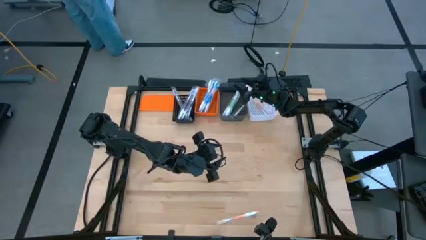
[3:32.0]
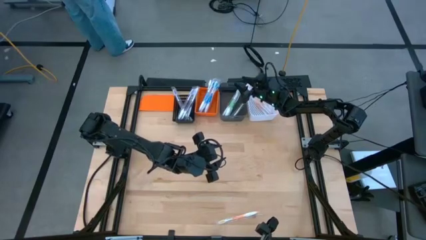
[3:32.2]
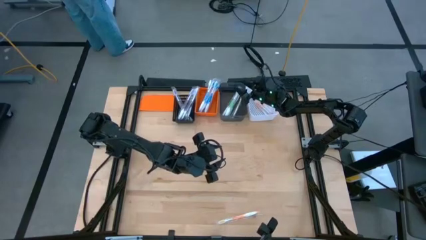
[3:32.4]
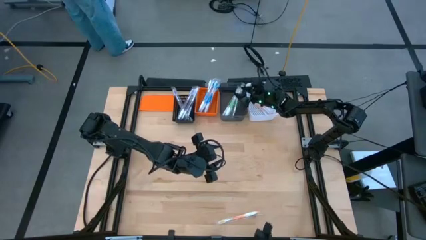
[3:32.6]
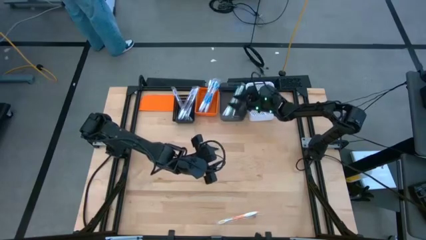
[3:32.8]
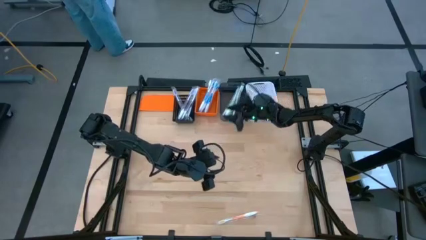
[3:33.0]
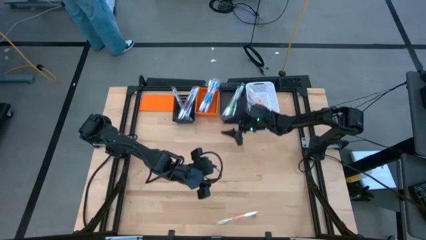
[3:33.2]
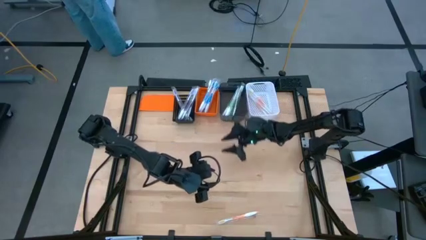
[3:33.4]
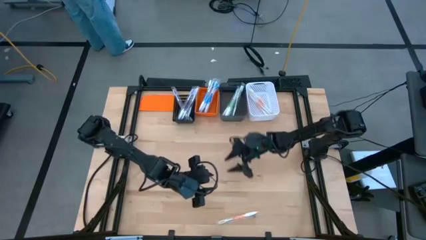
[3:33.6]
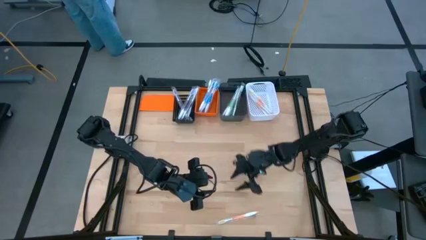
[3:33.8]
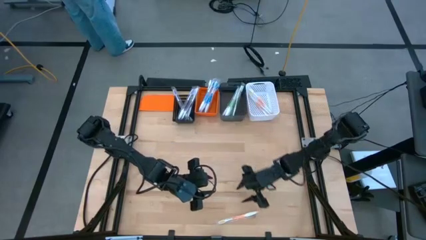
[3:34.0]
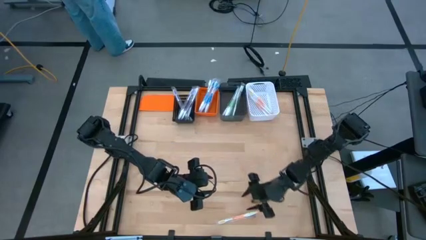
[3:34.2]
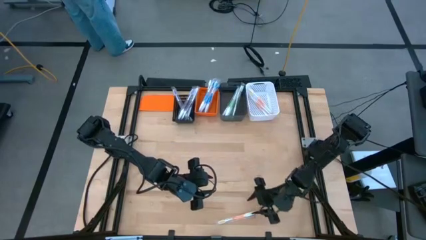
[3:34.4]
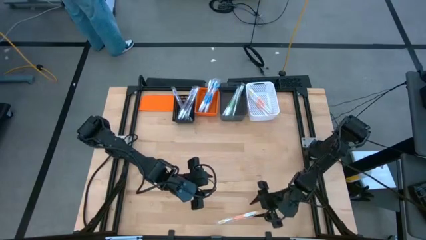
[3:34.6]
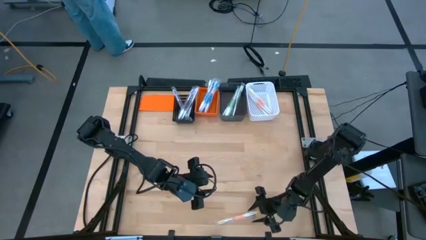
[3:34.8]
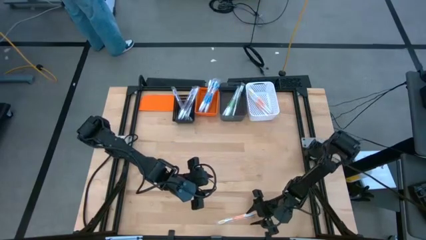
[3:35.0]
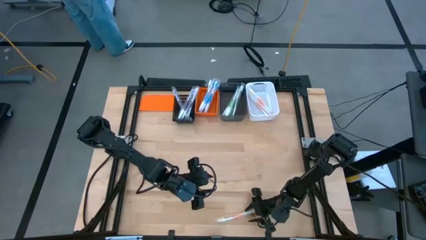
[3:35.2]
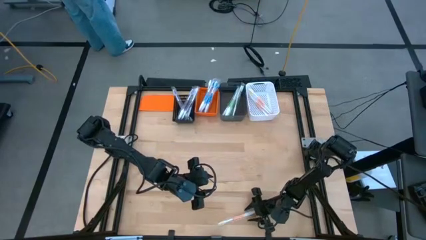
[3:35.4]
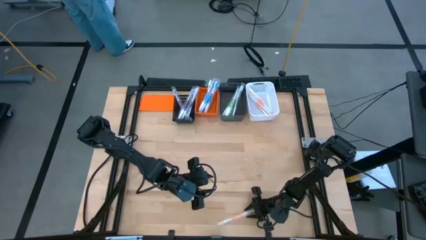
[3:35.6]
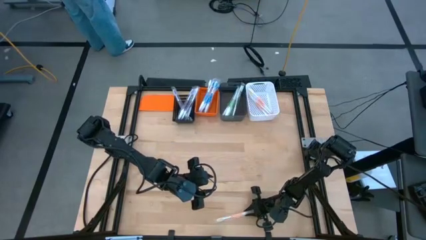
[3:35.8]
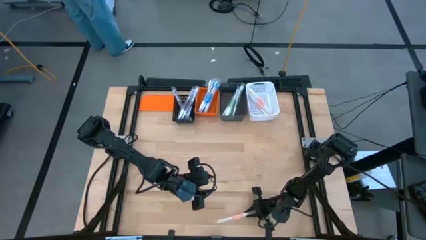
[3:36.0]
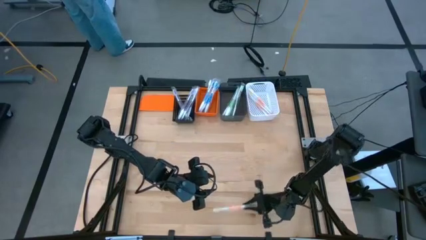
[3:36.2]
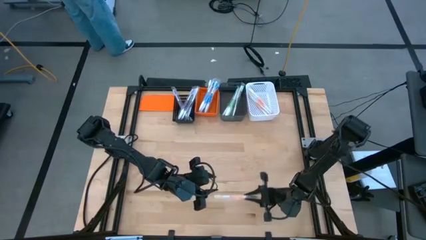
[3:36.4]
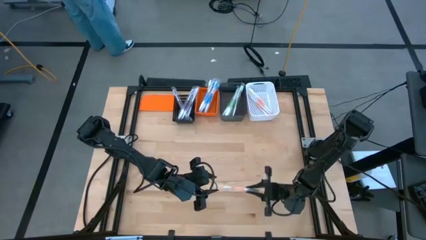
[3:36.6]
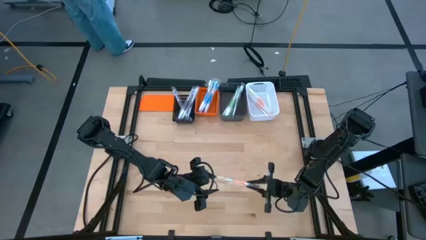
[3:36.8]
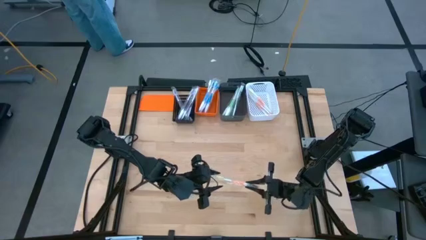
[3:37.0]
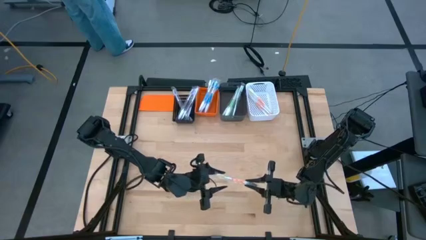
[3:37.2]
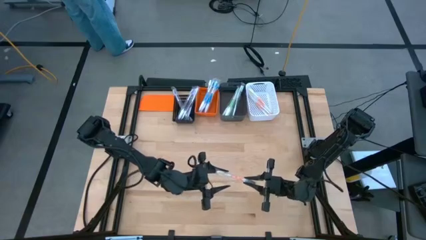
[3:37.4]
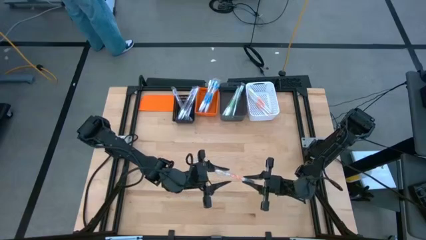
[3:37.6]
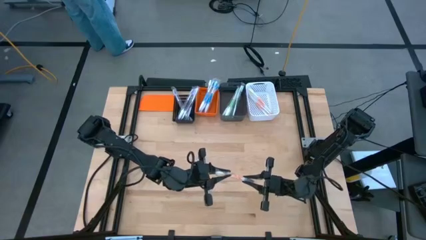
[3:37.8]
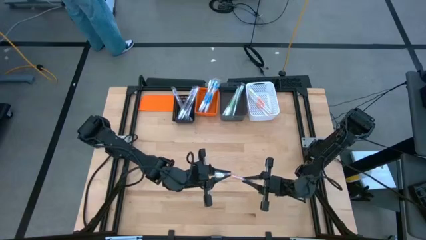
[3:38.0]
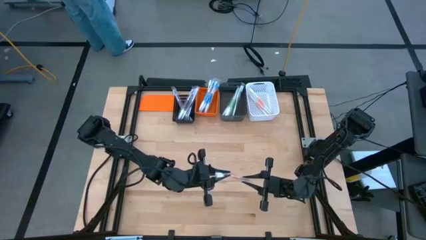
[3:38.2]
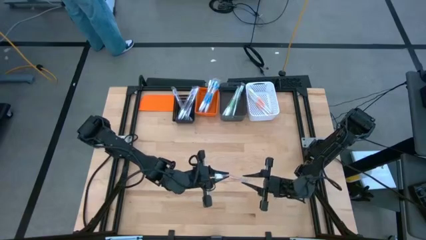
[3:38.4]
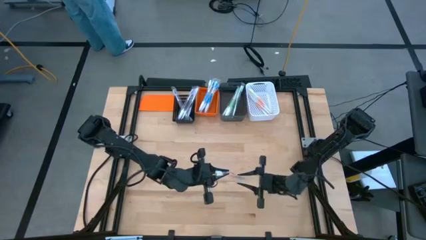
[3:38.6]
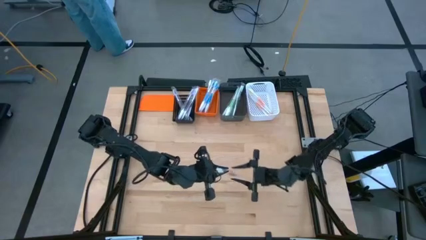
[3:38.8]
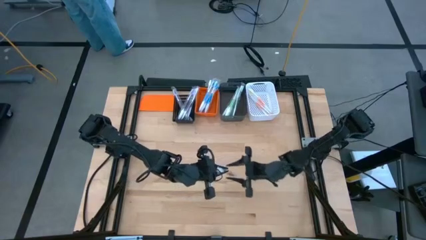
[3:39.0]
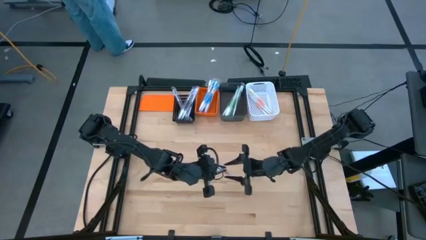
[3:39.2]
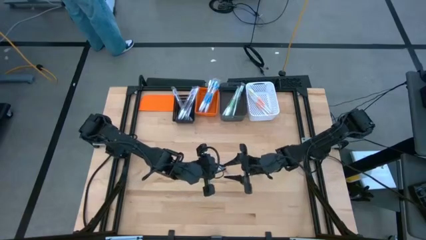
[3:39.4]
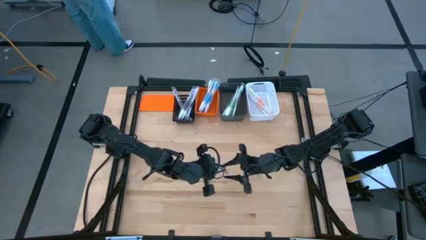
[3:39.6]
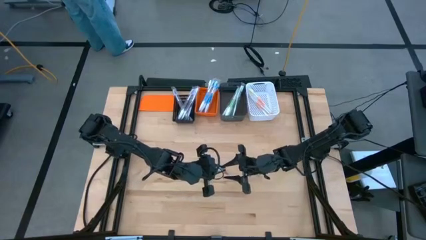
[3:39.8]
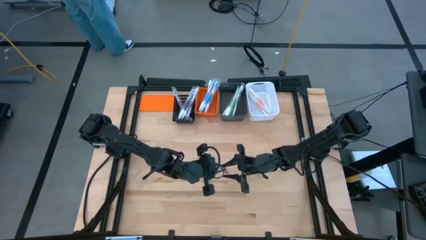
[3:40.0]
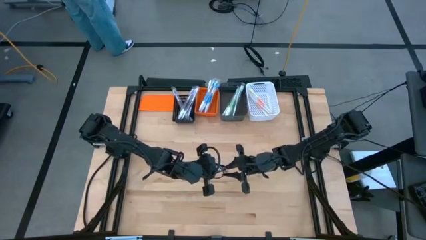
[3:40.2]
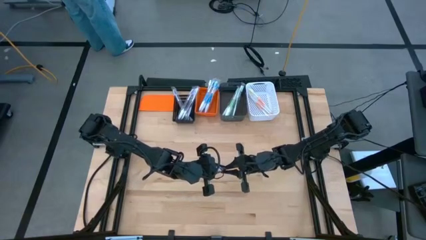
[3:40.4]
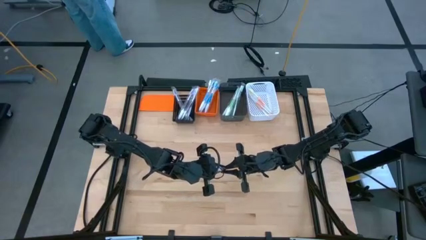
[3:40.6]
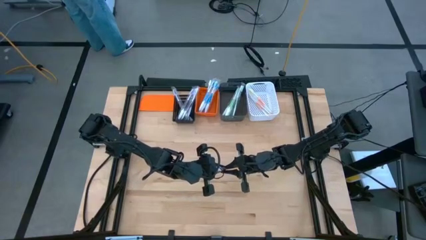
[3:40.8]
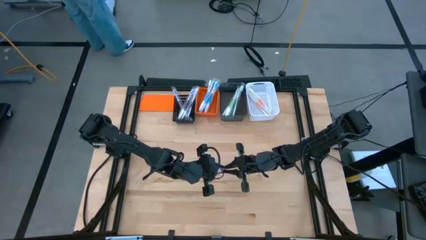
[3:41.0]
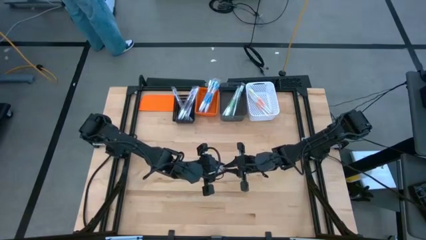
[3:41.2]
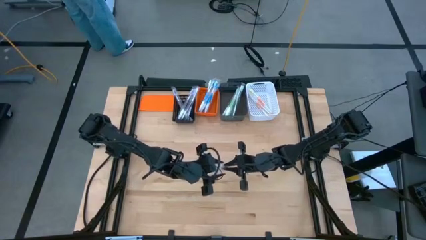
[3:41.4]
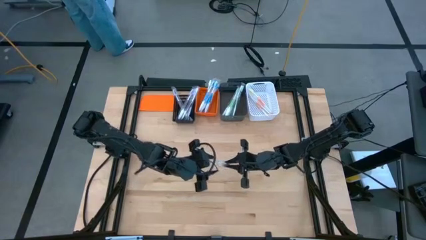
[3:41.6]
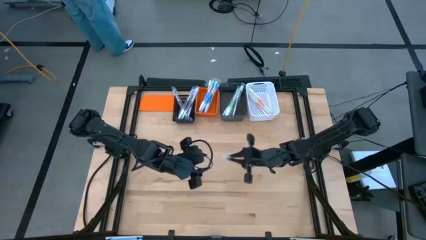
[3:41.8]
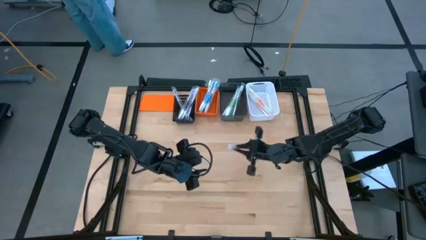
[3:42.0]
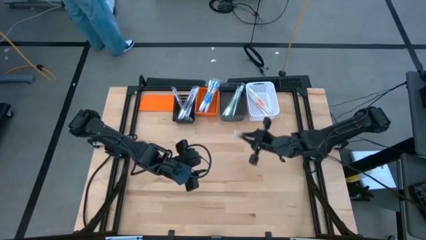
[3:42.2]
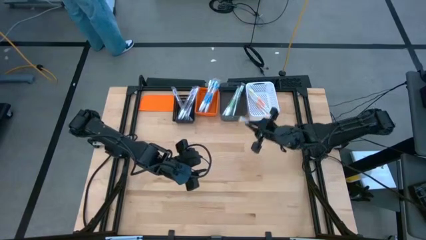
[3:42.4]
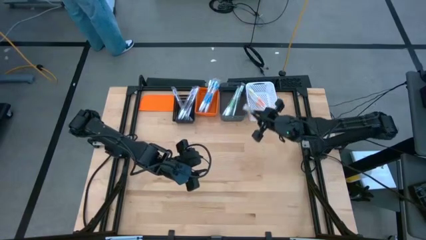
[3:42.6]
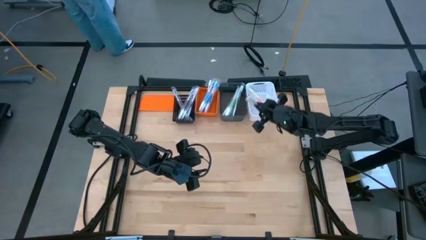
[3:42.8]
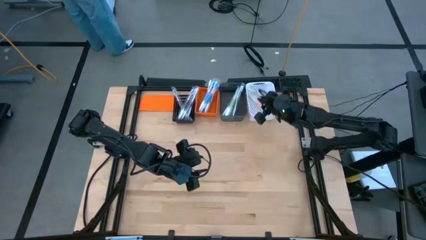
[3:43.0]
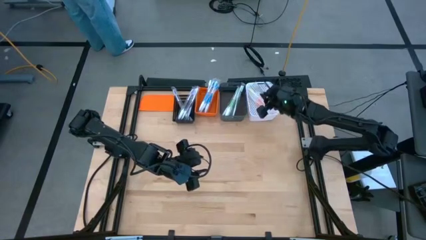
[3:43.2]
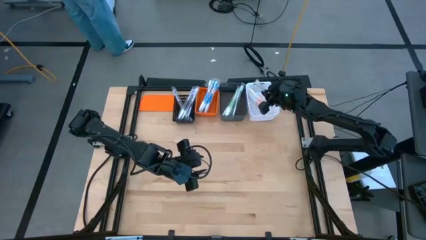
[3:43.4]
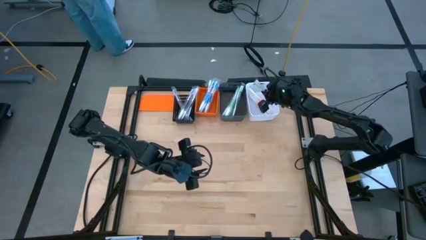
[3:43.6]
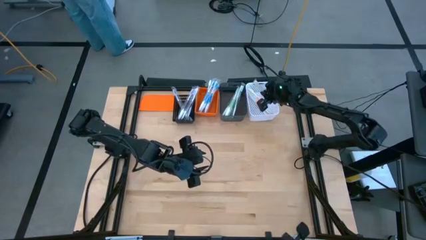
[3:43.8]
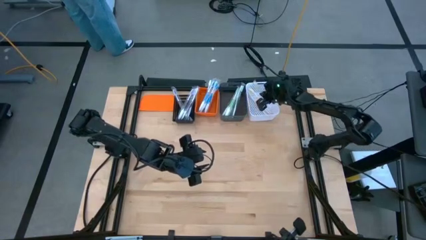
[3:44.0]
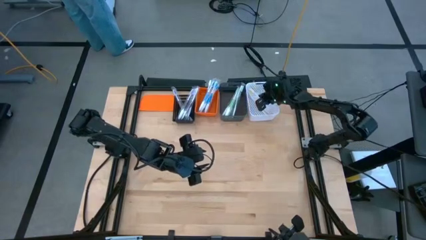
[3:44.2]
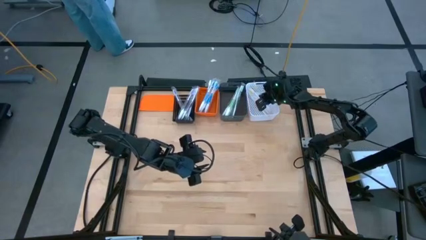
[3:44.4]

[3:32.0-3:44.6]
Task: Pick & Place Toothbrushes
Put the orange toothbrush into the white bin

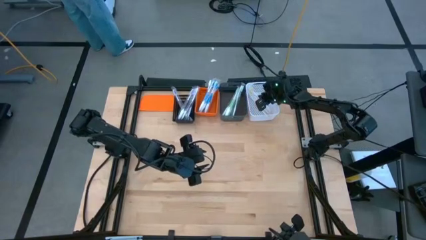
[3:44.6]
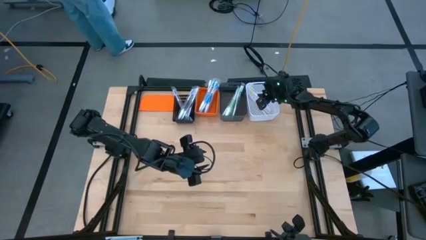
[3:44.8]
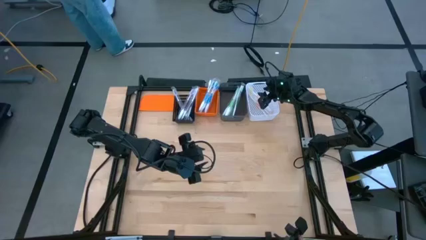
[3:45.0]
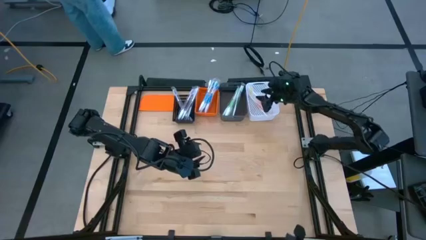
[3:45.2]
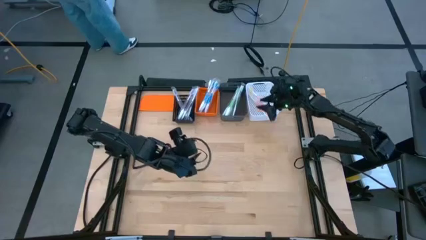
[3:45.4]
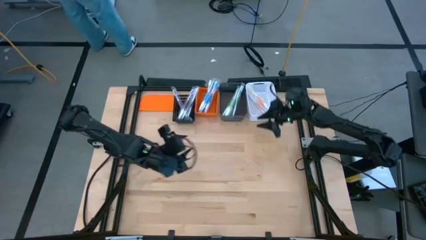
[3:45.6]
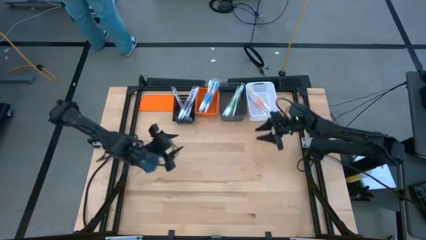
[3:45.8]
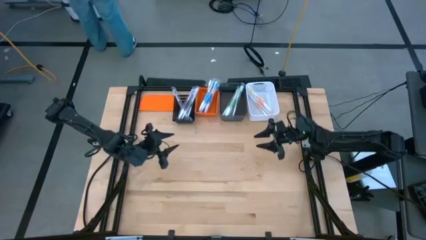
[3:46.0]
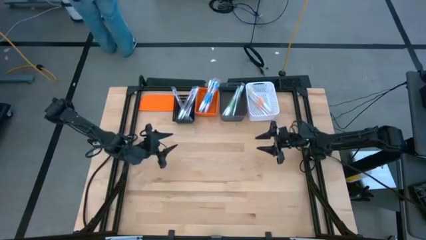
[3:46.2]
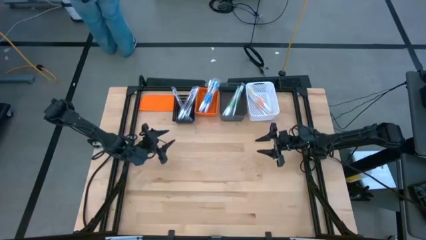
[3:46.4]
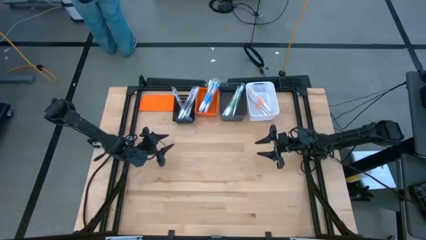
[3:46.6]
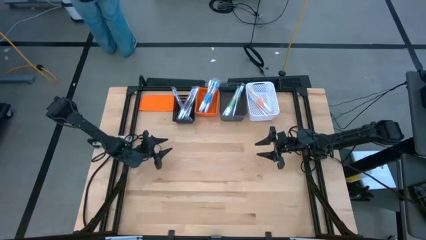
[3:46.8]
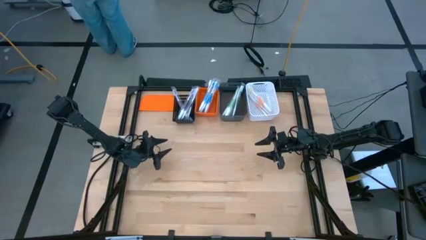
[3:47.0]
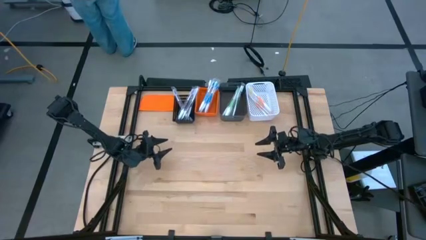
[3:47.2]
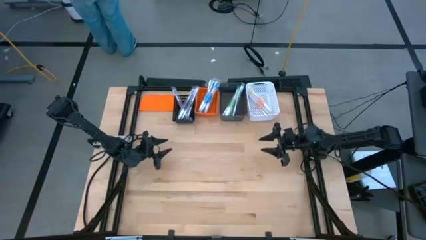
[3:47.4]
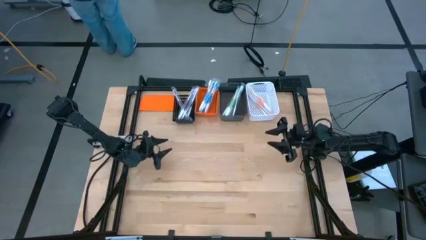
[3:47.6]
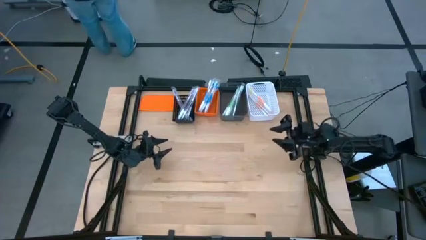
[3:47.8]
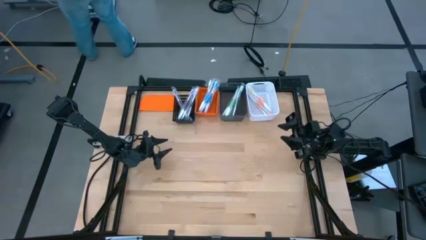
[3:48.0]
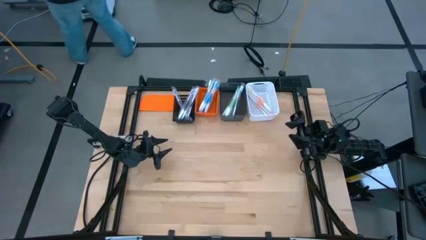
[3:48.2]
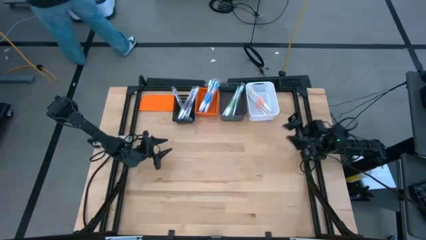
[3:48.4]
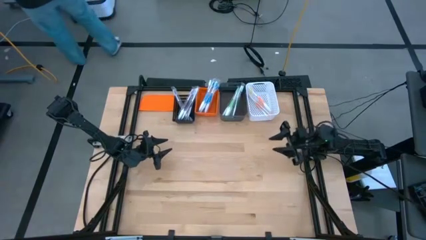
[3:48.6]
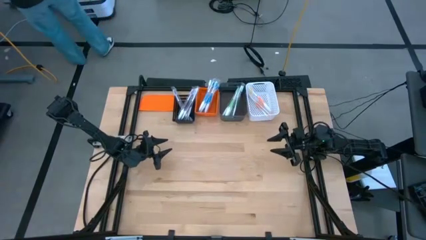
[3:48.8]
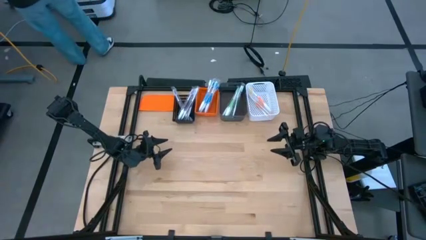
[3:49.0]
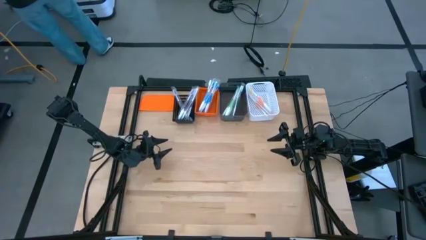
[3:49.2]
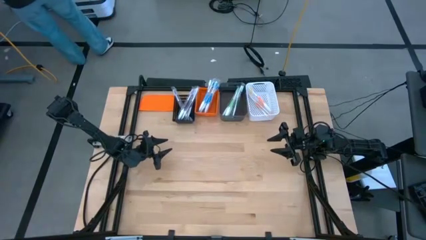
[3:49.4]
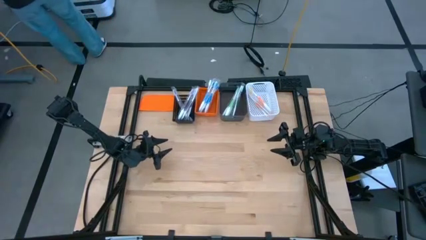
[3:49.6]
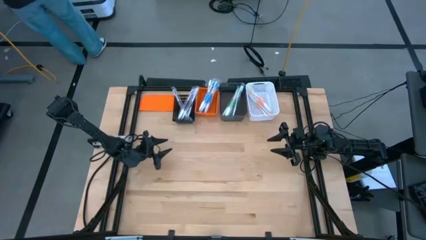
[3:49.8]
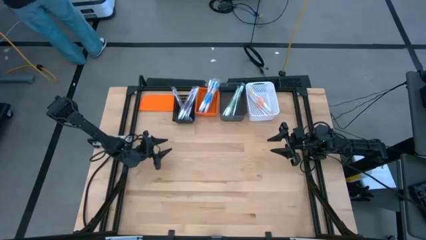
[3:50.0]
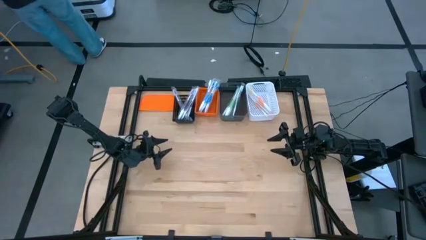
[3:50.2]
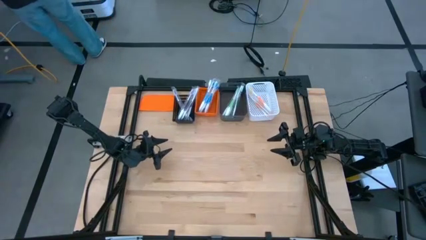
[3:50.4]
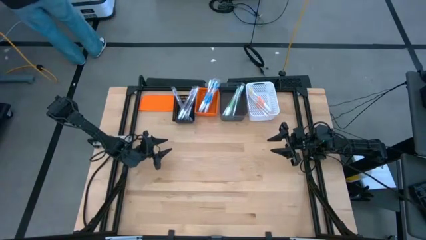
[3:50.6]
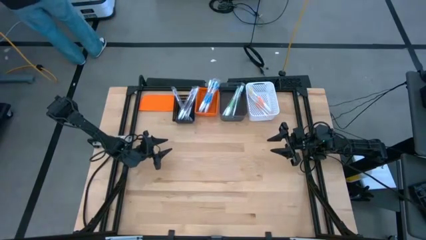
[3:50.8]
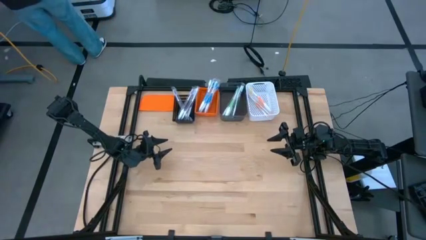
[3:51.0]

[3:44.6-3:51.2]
Return to Home Position
